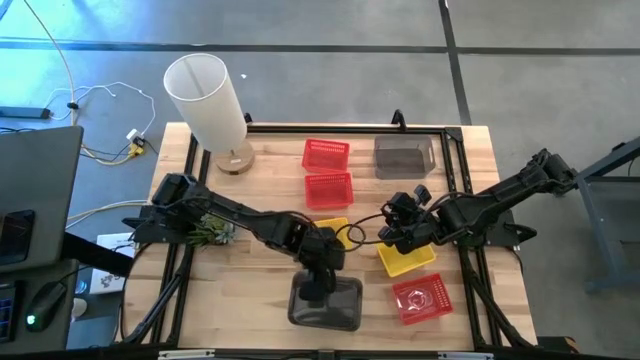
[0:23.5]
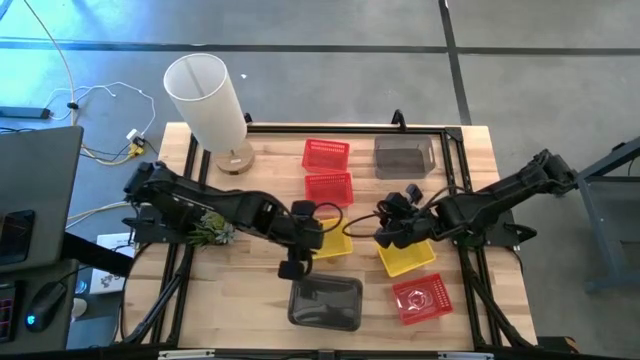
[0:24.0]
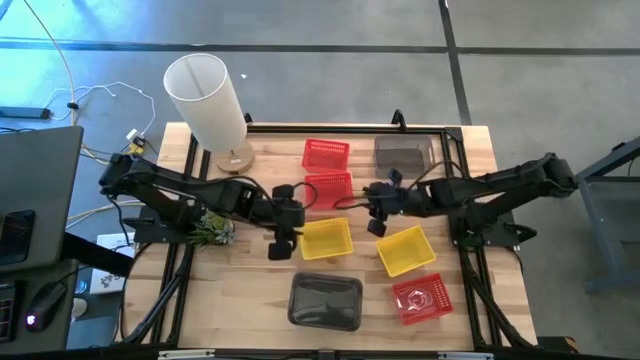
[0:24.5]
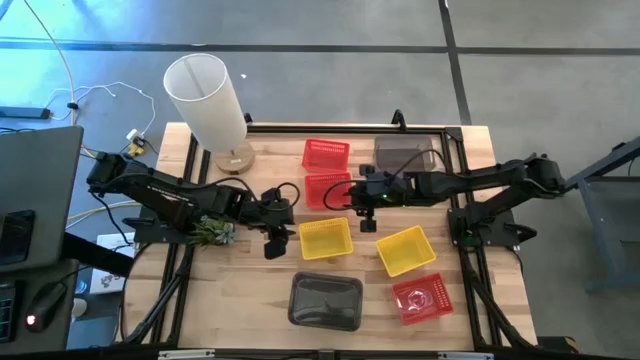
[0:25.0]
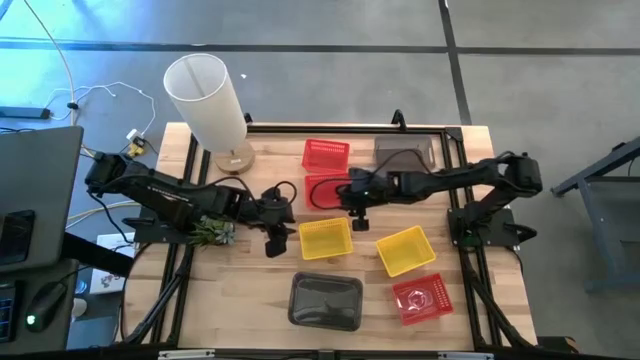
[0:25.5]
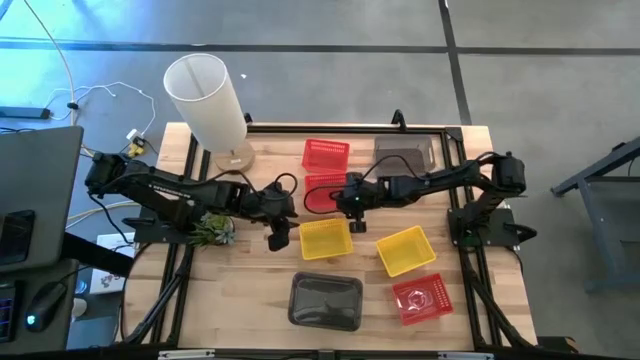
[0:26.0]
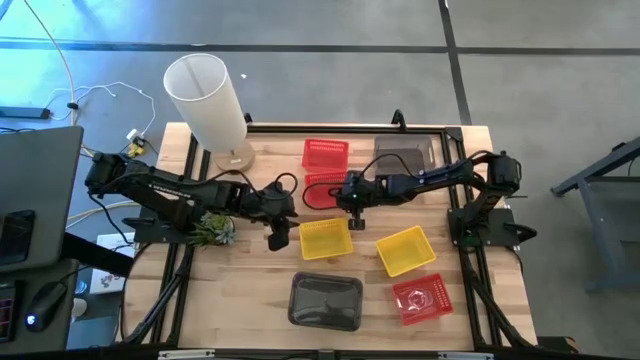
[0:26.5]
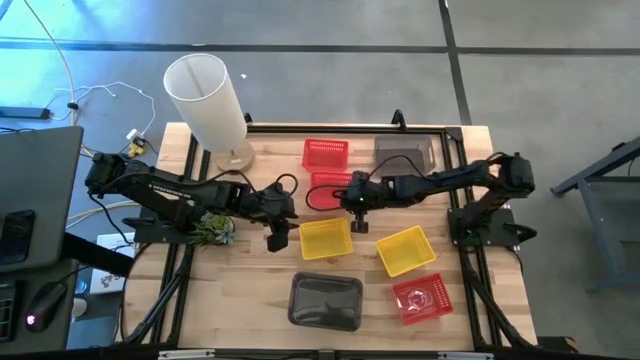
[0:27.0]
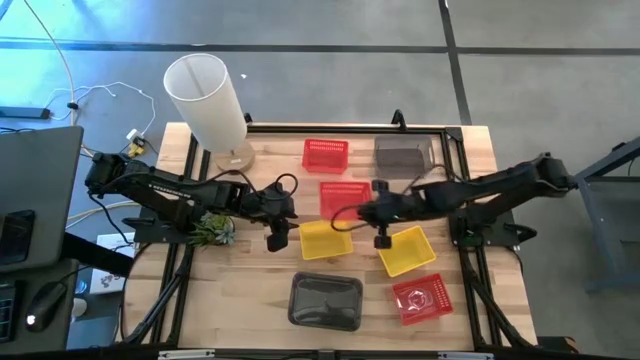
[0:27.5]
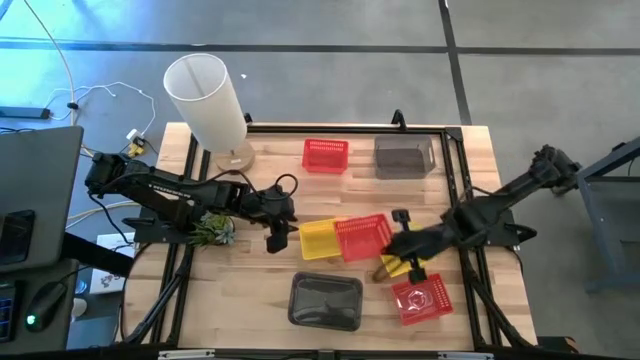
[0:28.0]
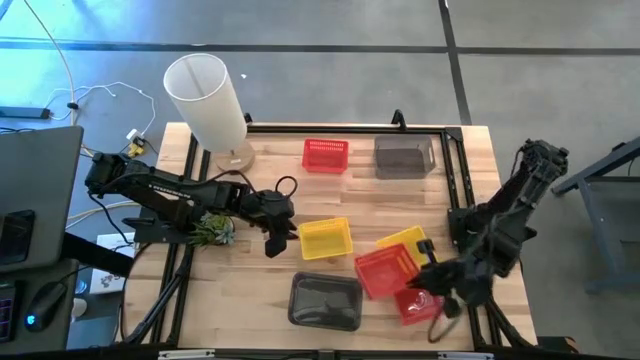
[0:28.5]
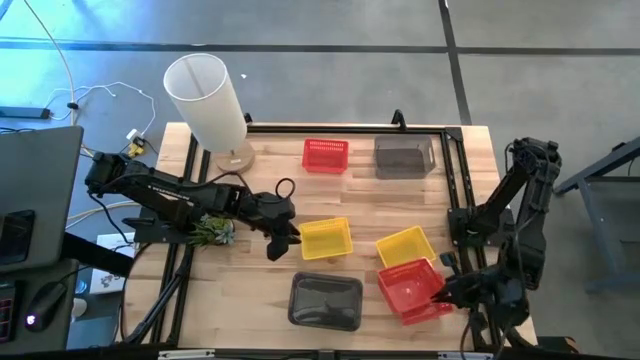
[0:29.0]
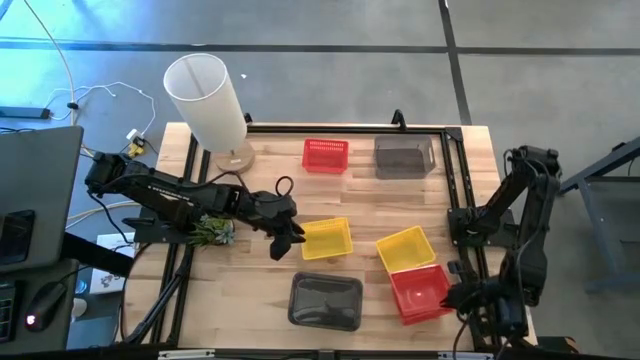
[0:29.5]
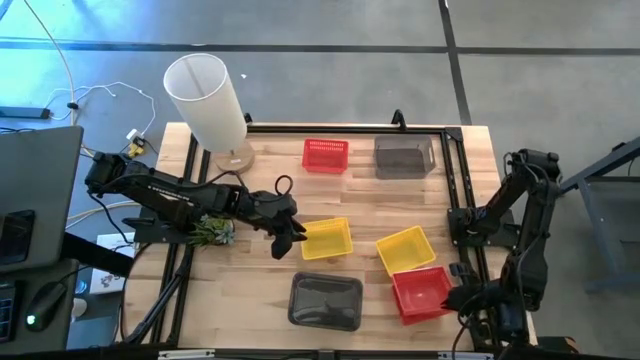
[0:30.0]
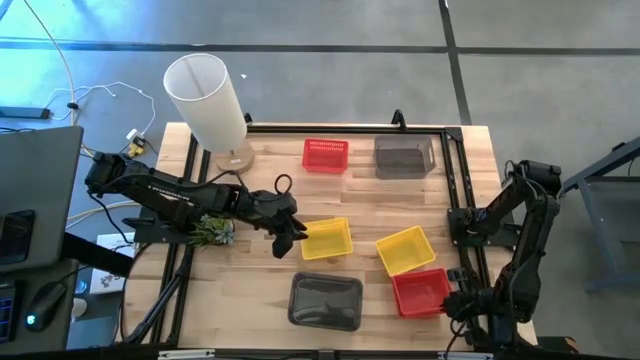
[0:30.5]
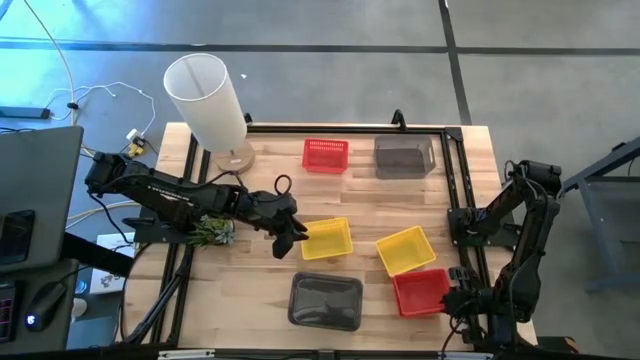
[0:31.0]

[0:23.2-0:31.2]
Stack the middle red bin into the bottom red bin

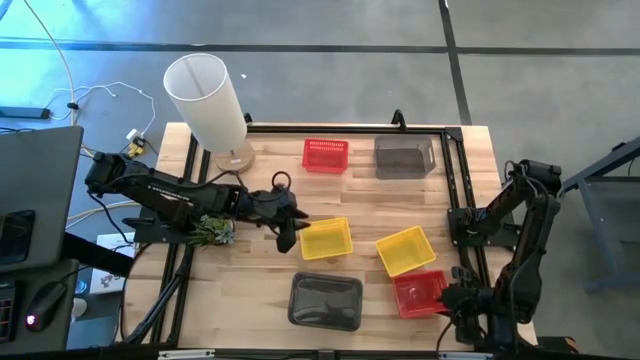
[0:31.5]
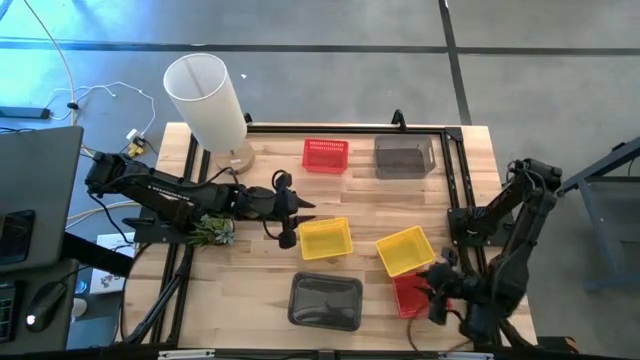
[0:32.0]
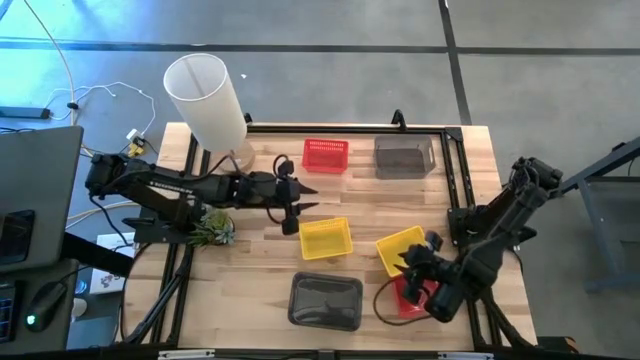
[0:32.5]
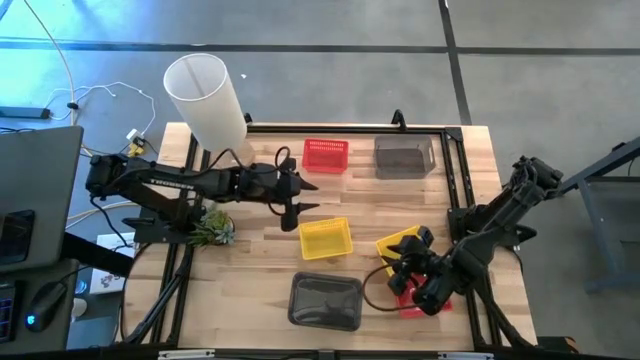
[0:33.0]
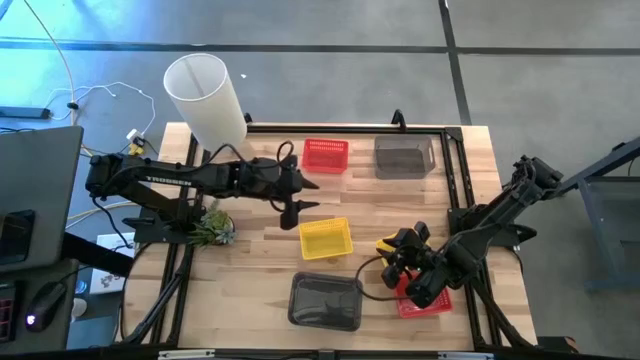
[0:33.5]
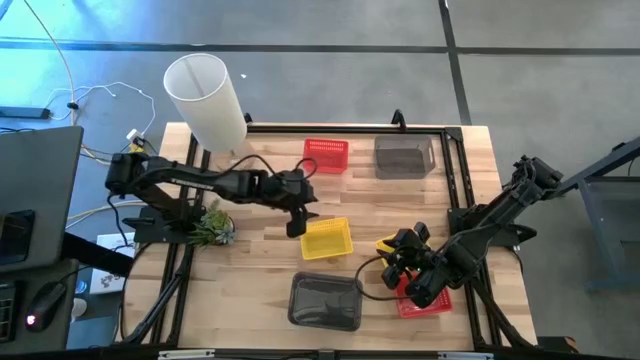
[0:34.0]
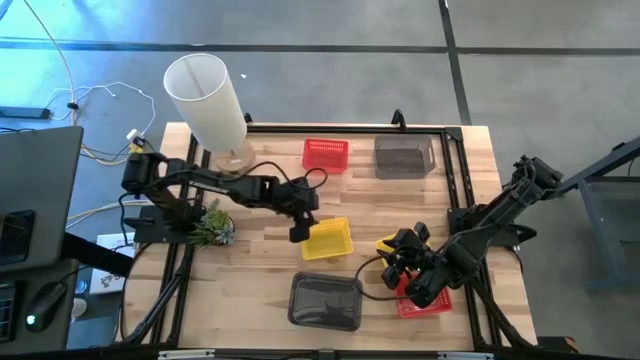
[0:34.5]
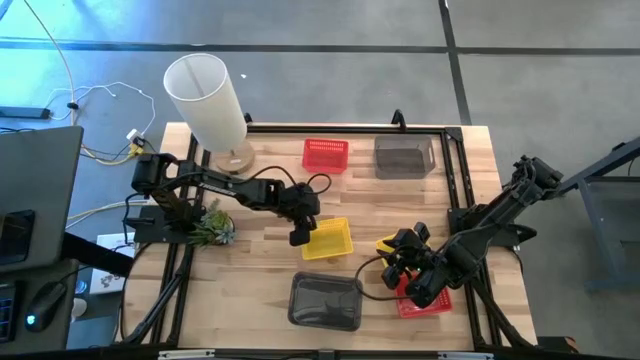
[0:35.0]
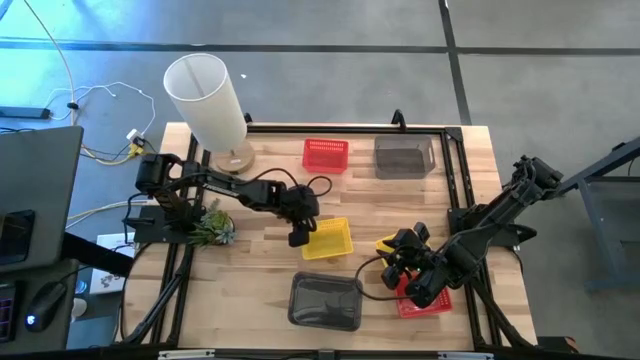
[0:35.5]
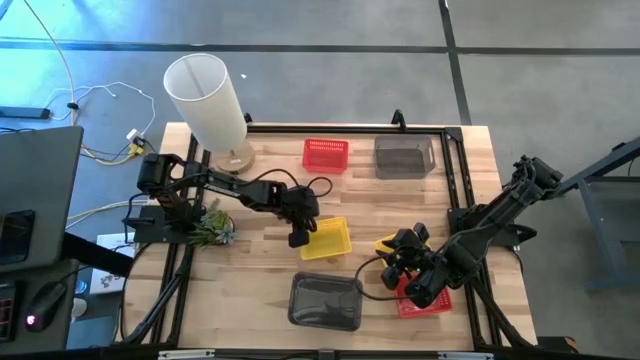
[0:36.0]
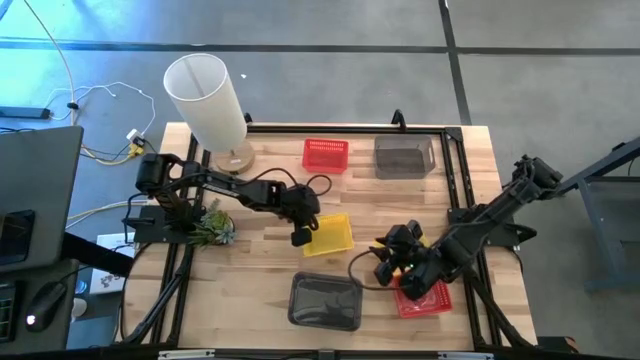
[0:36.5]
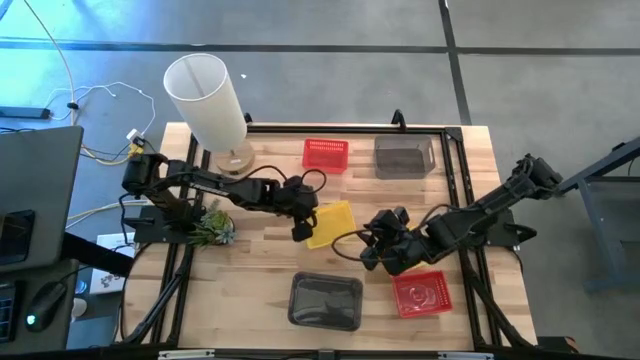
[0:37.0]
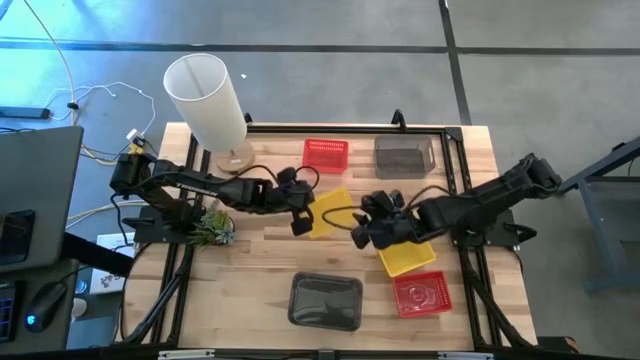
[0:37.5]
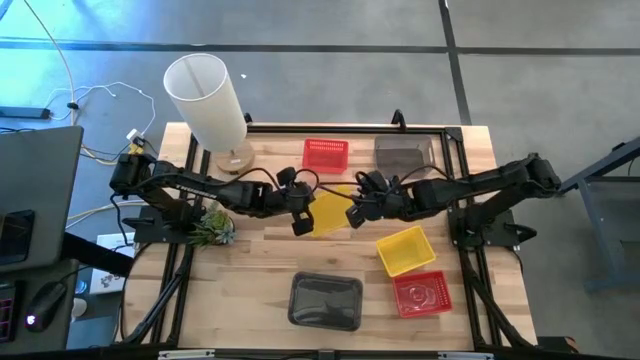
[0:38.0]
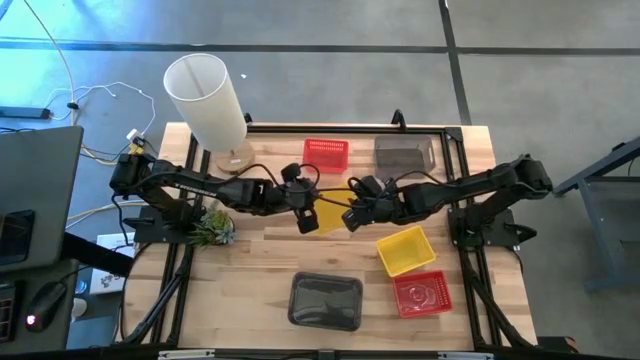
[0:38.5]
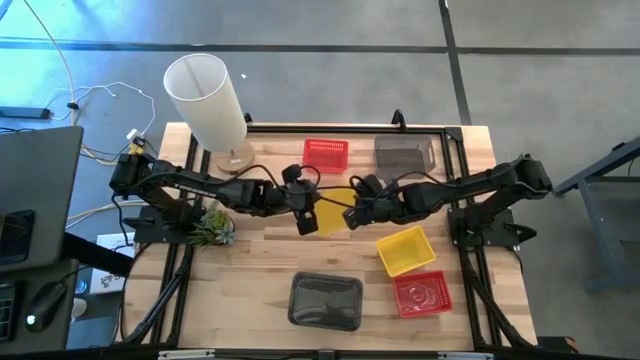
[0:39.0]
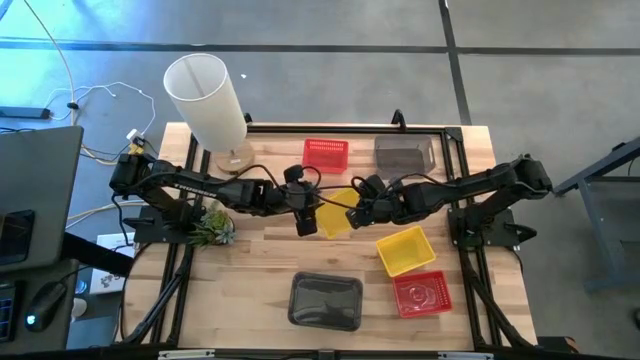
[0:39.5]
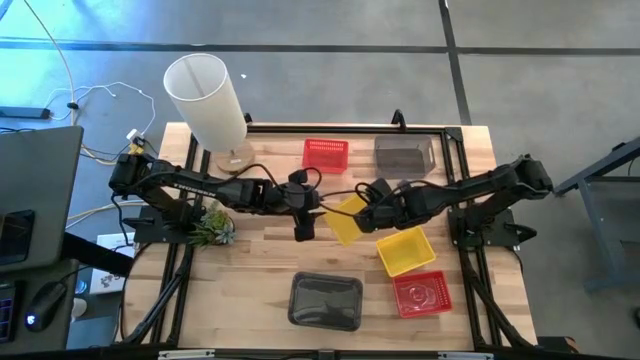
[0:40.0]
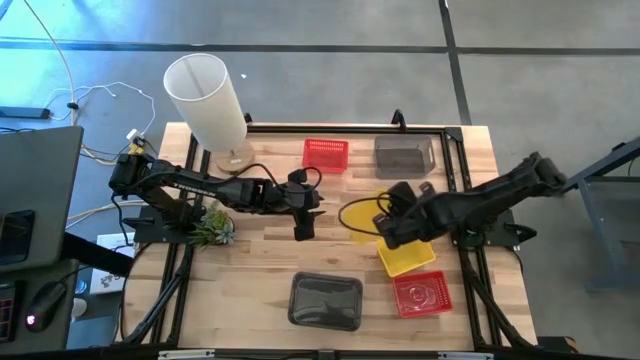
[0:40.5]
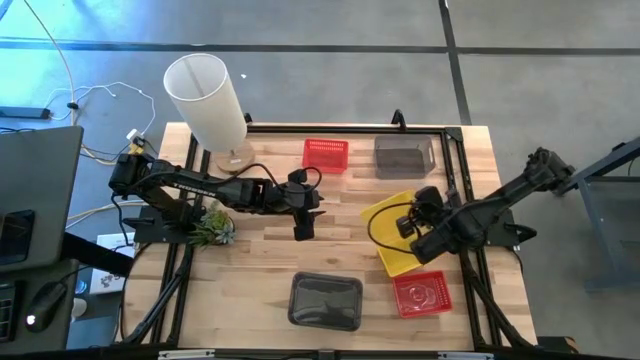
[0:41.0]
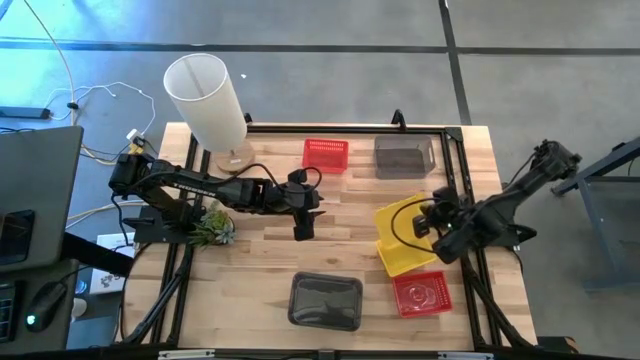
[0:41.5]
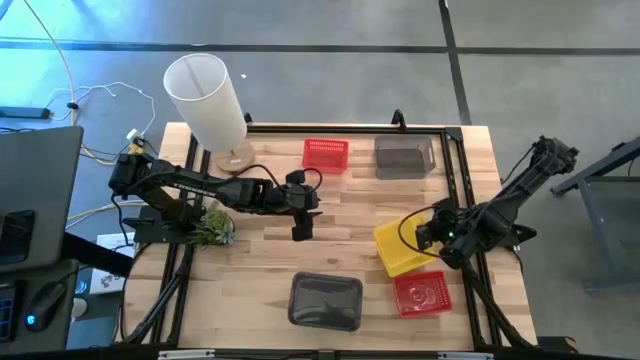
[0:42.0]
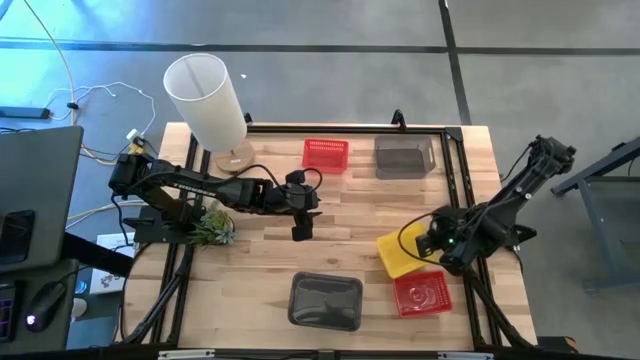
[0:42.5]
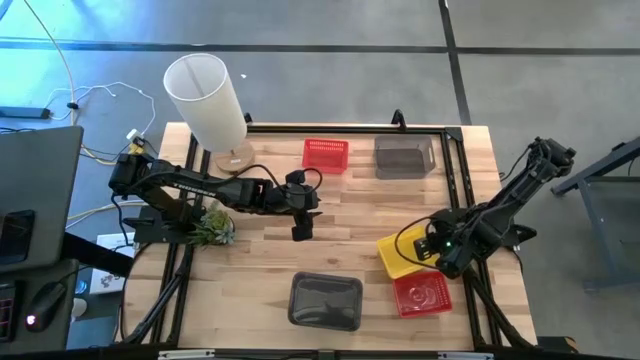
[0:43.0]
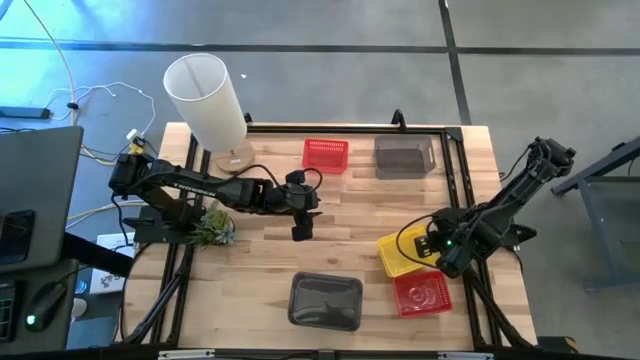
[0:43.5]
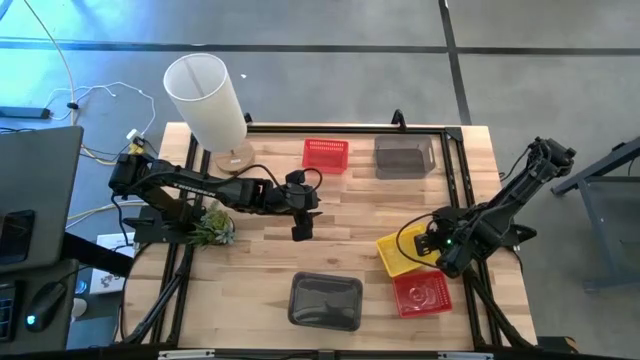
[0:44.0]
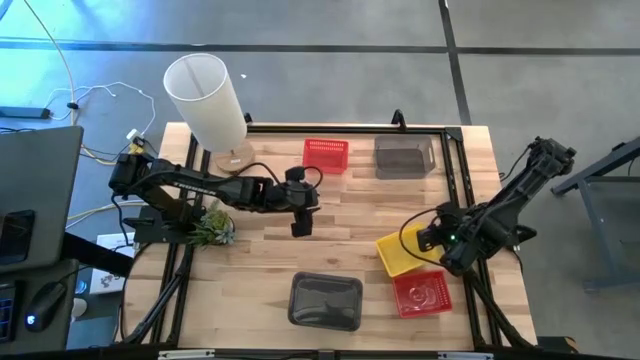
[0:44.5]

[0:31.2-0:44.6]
Stack the left yellow bin into the stacked yellow bins
